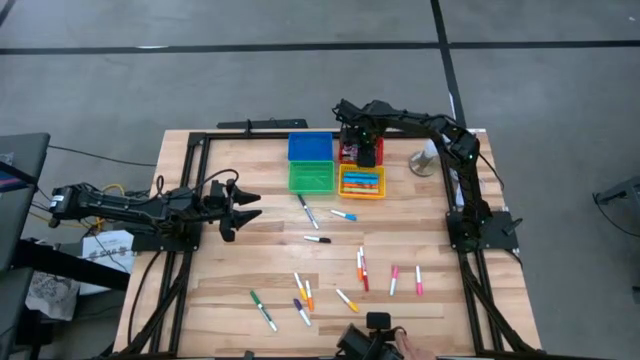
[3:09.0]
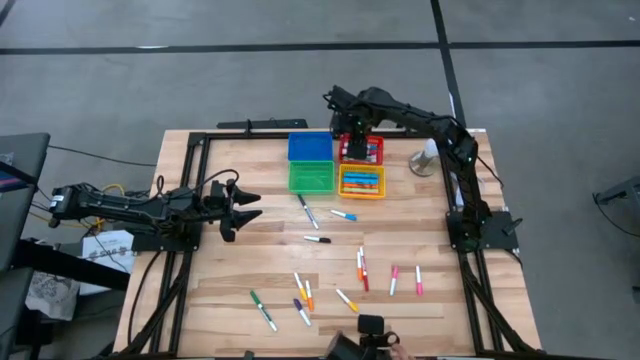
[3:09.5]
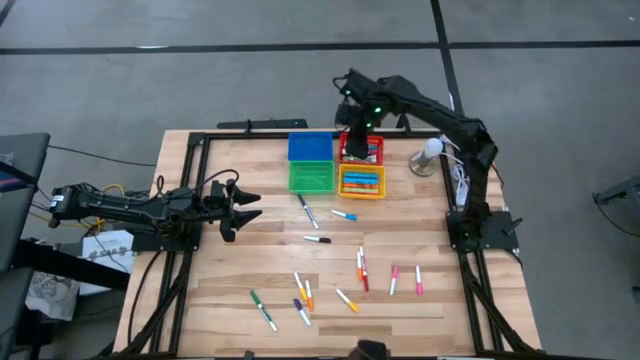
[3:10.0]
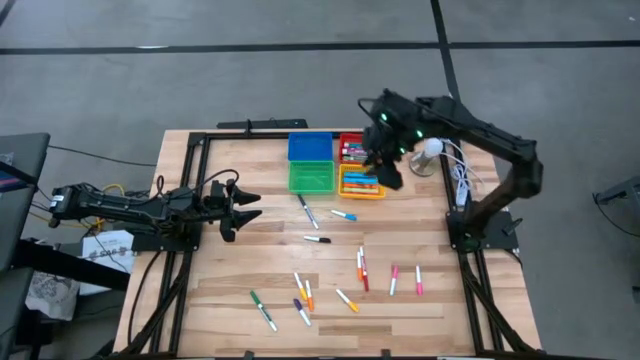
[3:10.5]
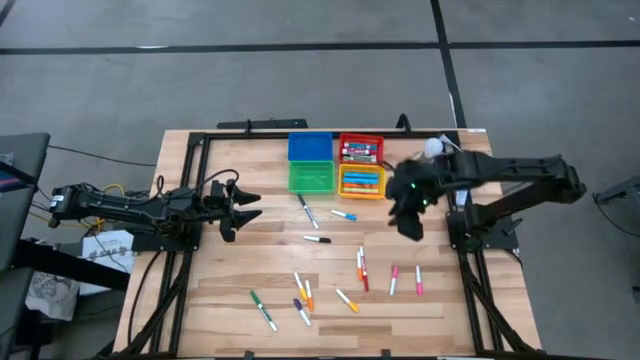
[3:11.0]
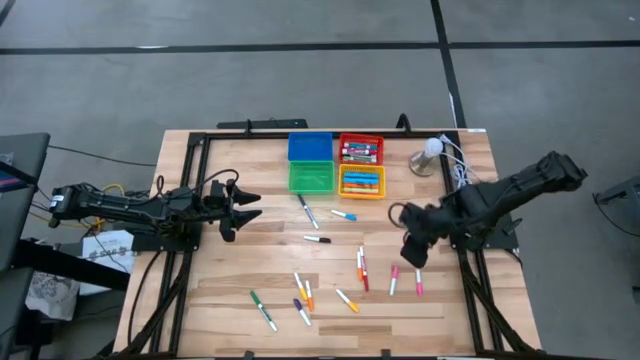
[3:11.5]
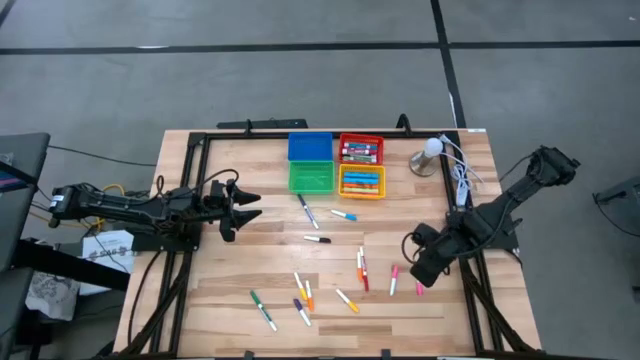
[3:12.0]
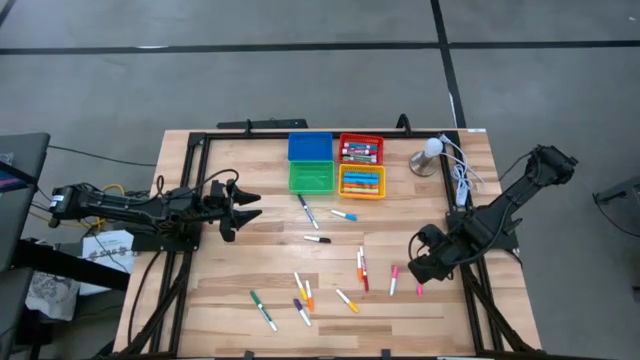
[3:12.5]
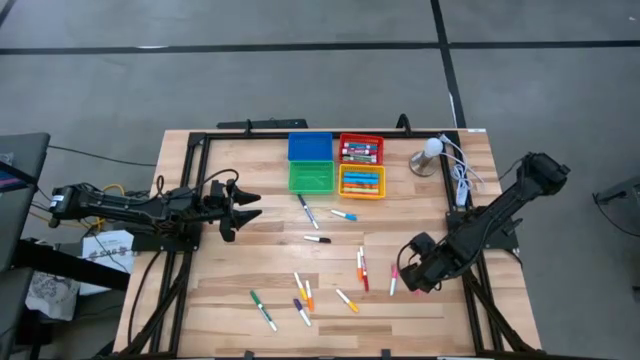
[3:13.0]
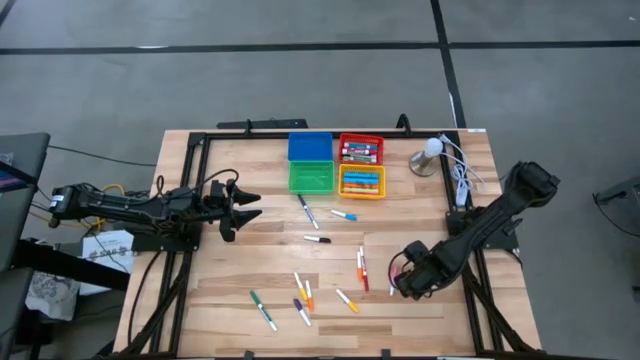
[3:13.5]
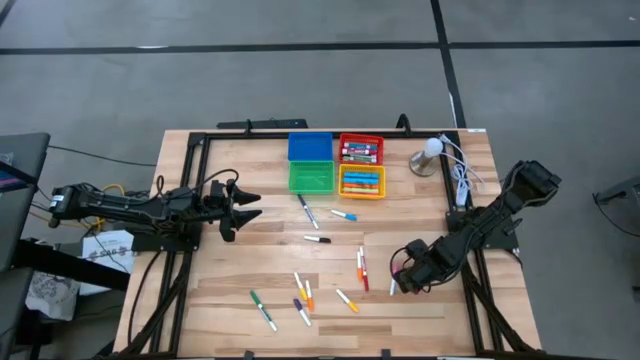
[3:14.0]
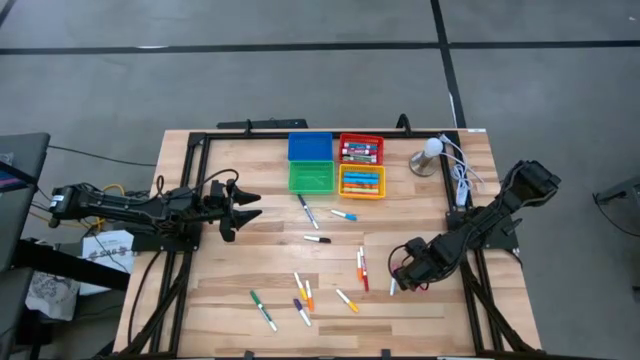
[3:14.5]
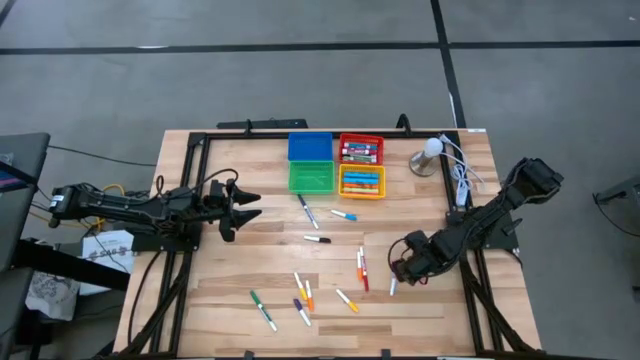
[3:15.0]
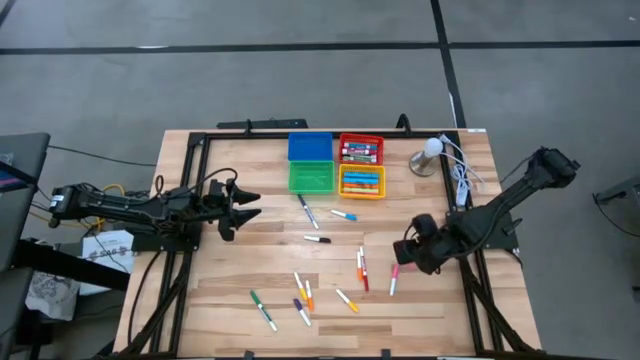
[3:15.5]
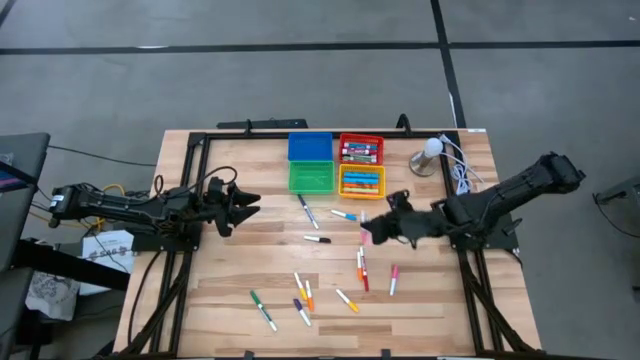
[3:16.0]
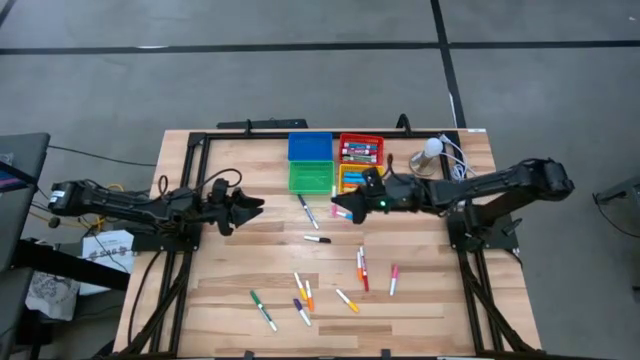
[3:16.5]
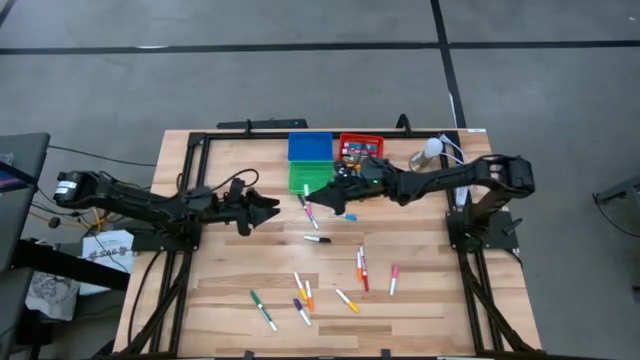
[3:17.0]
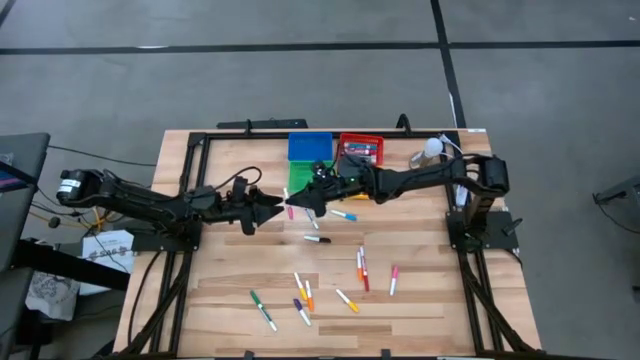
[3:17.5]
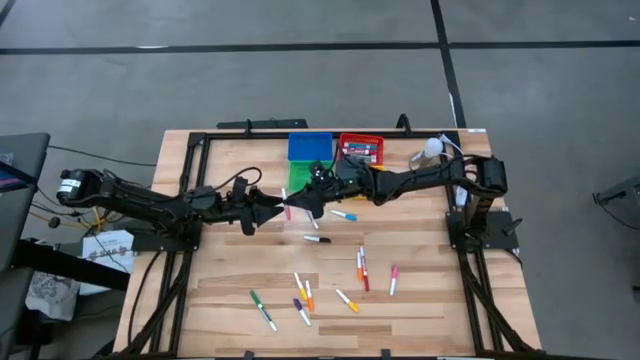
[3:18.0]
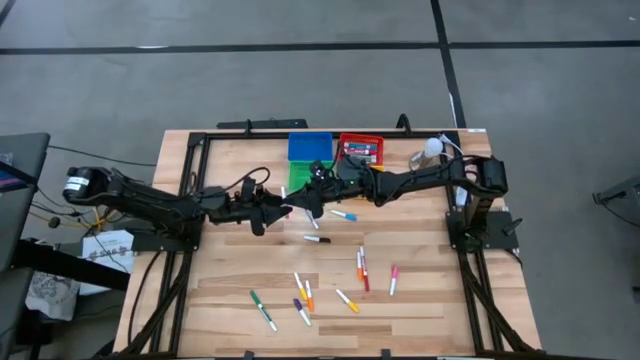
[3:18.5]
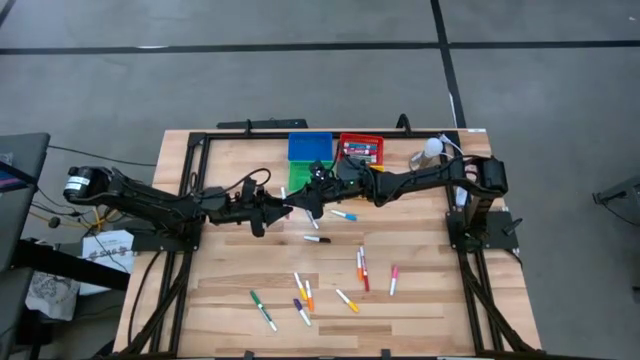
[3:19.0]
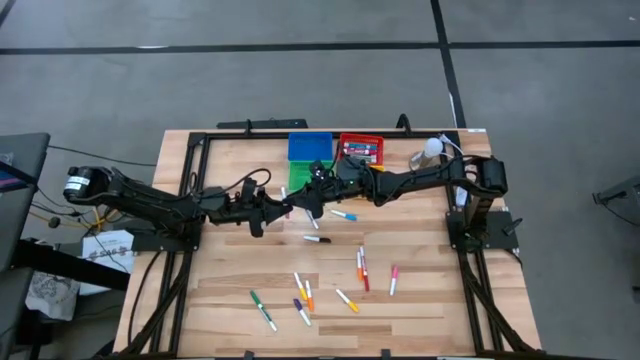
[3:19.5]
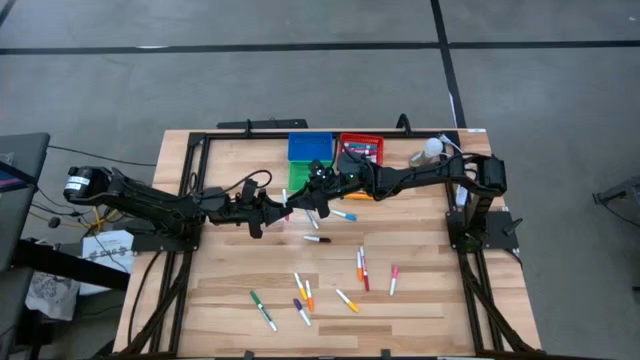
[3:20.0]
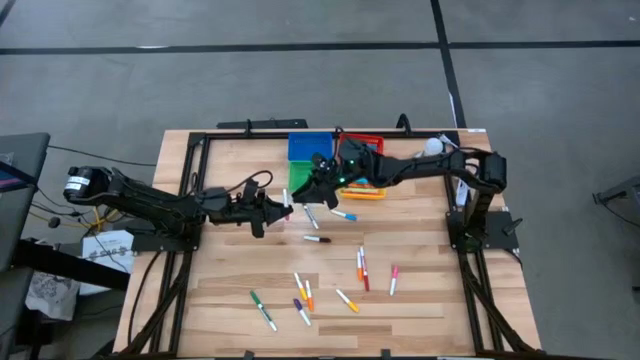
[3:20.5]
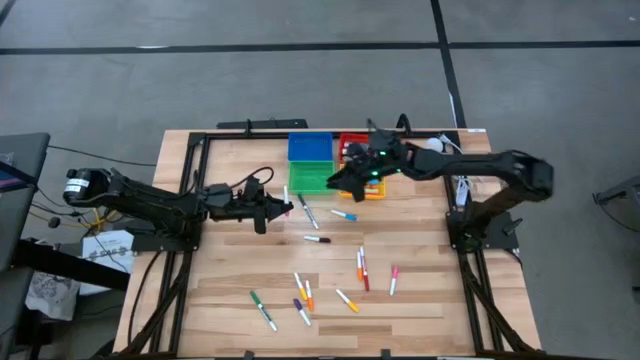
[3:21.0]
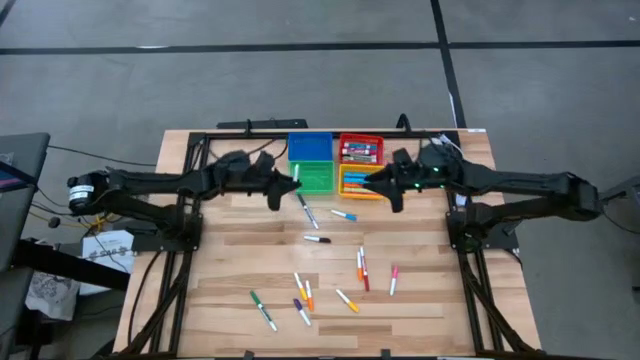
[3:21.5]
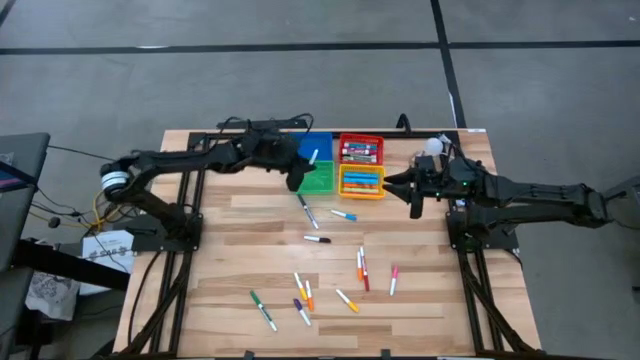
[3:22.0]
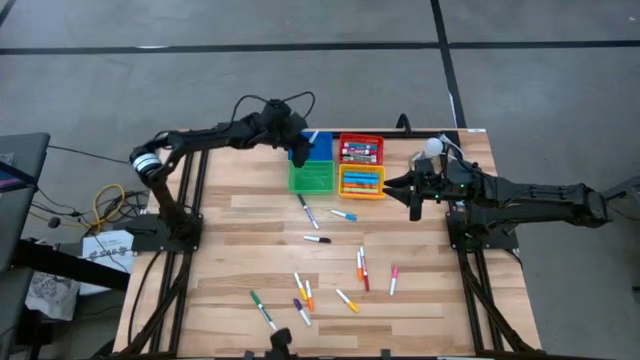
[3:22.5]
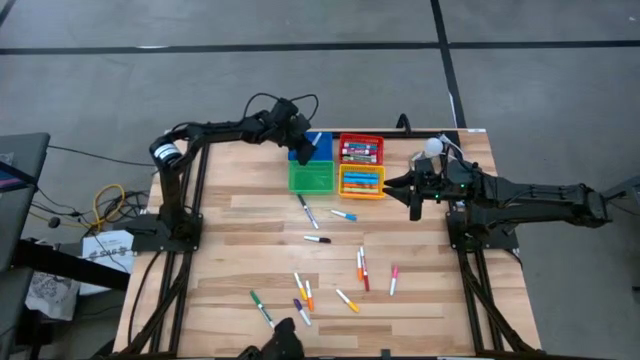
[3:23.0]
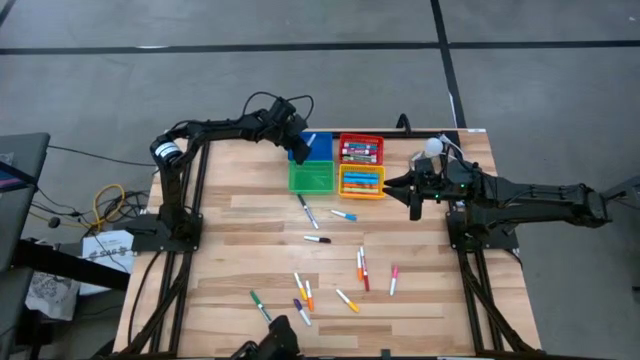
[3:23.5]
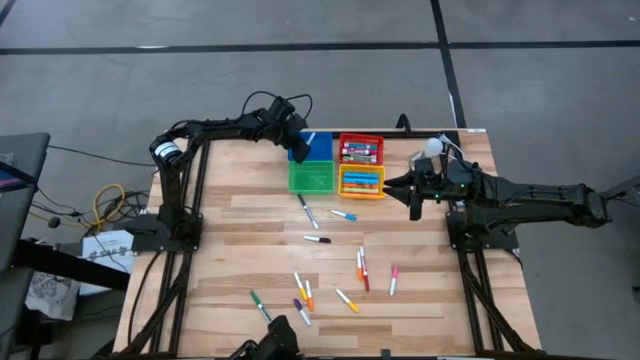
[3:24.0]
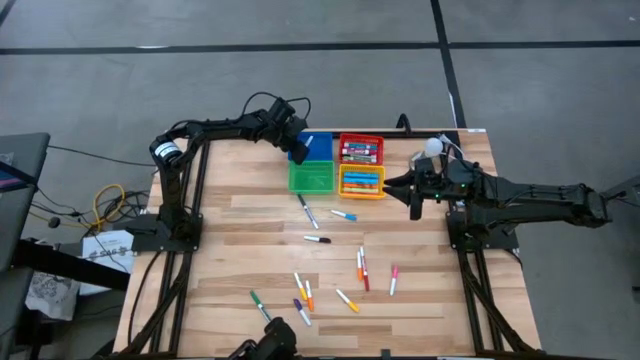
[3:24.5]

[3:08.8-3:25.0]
Task: Pick & Place Markers
Put the right small pink highlighter pen into the blue bin

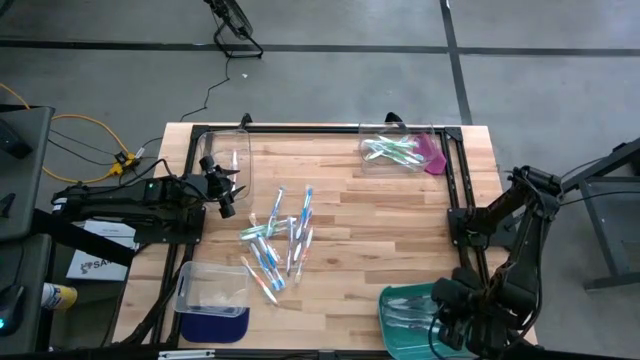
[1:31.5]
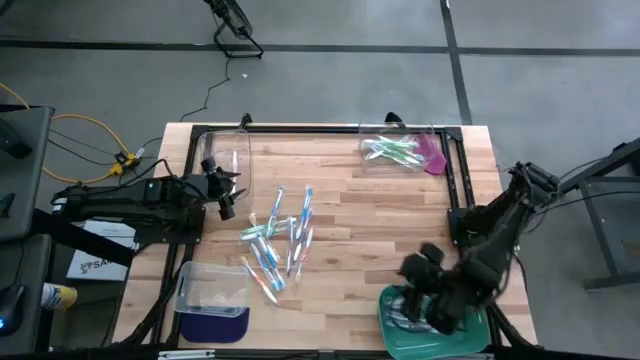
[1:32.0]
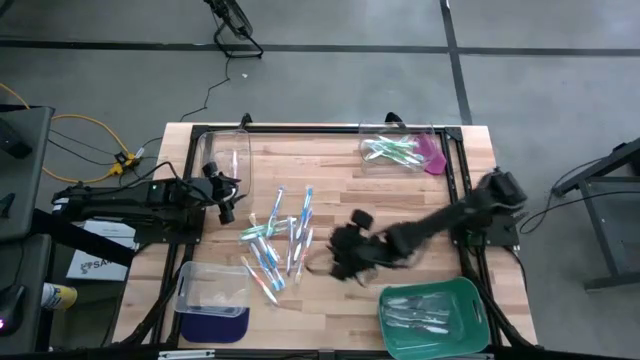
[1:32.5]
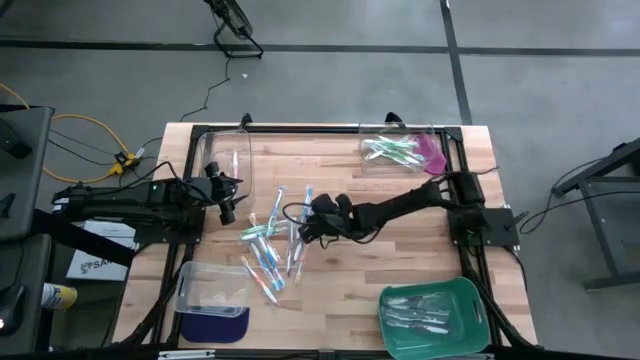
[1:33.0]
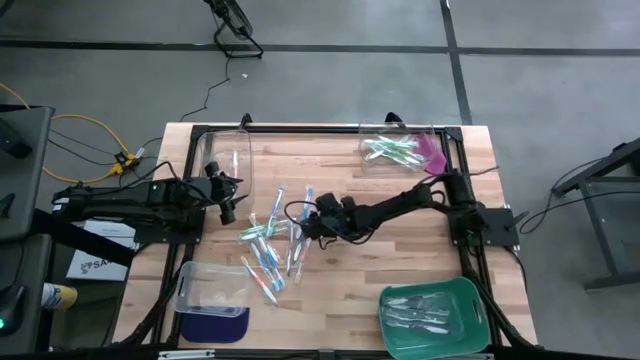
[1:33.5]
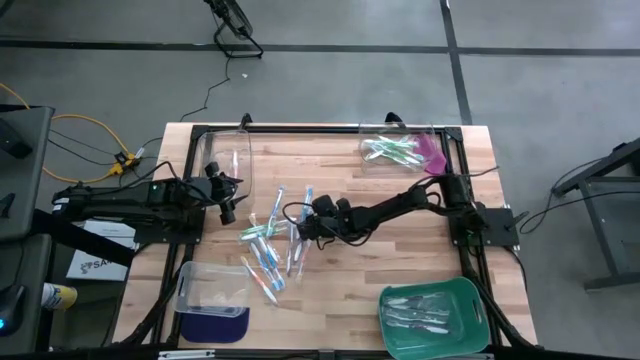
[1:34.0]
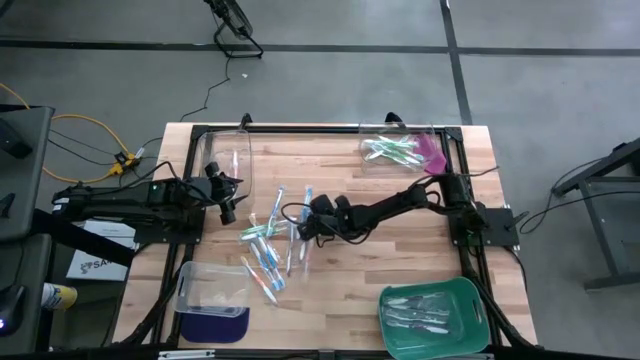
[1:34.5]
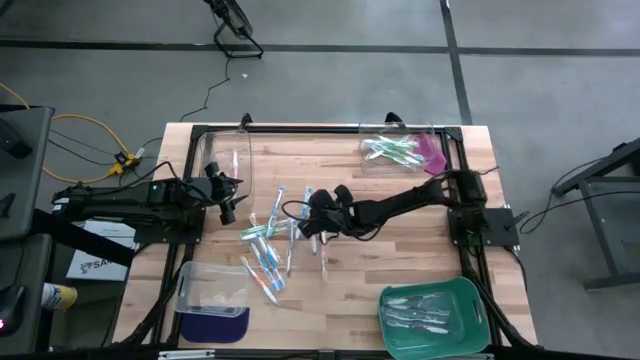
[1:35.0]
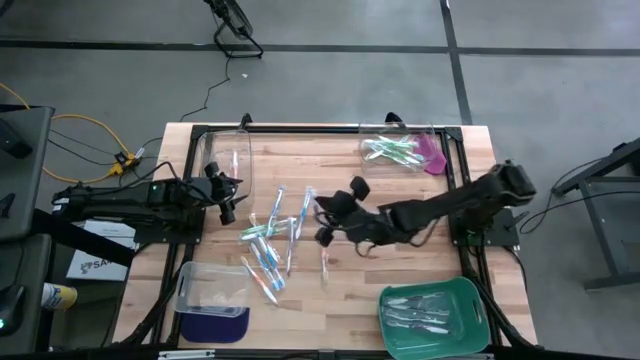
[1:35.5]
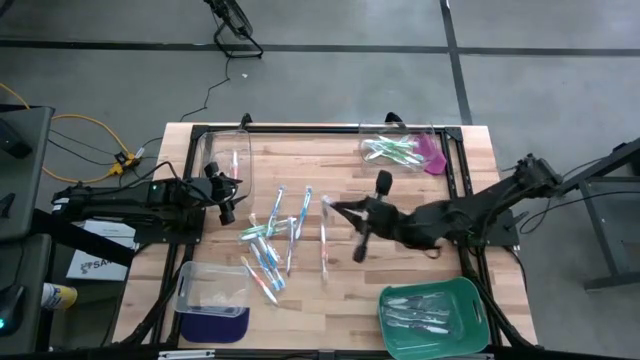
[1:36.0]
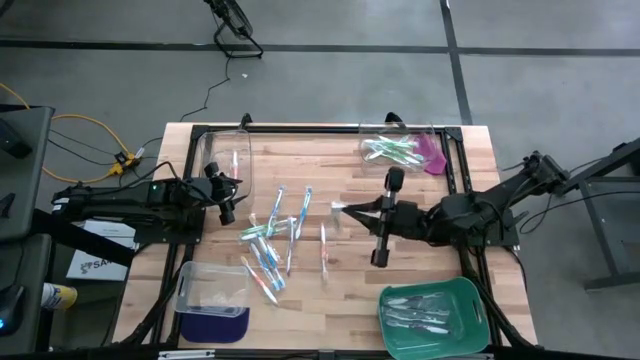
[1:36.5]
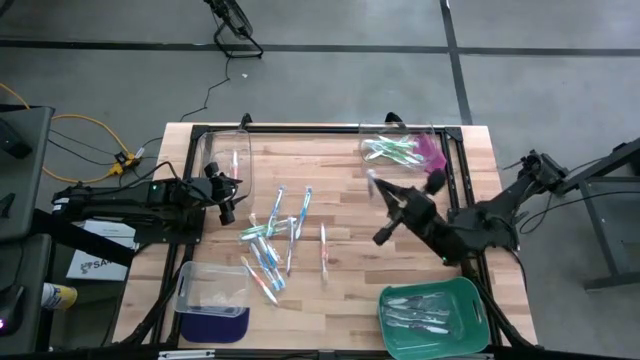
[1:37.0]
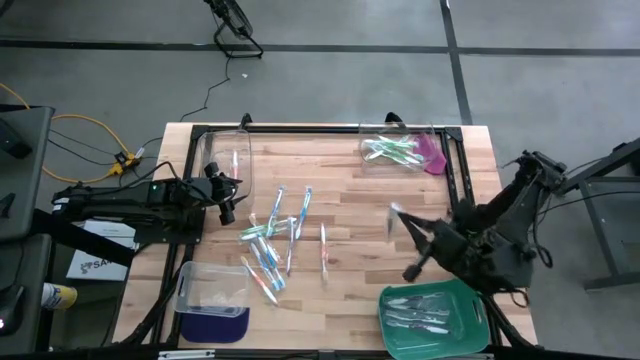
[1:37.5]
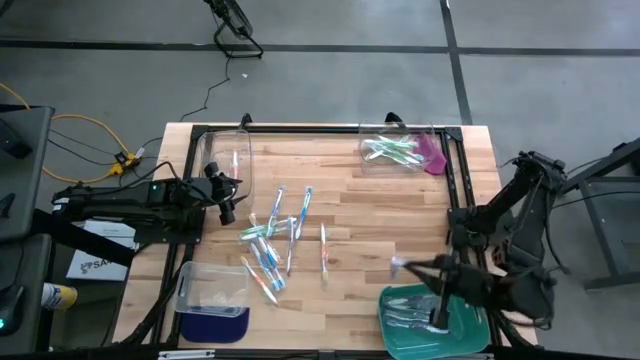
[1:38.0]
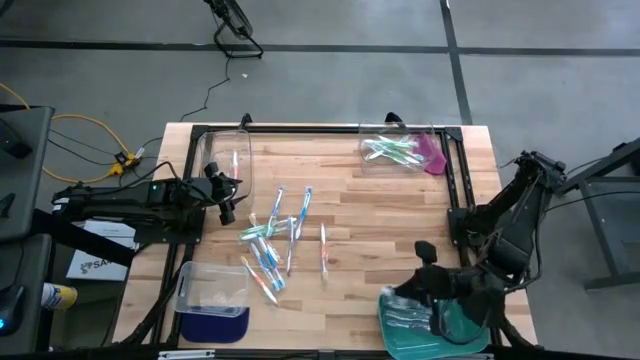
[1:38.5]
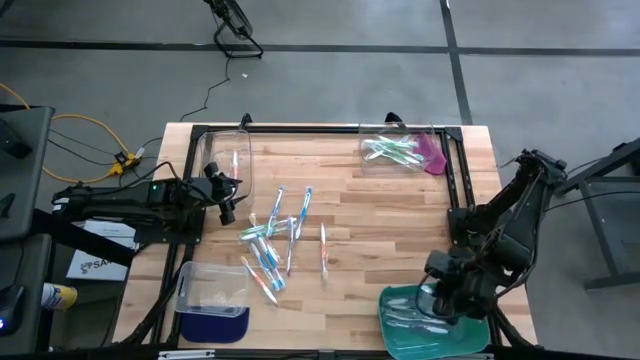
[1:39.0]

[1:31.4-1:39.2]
Task: Pick & Place Toothbrushes
Put the violet toothbrush into the green bin
